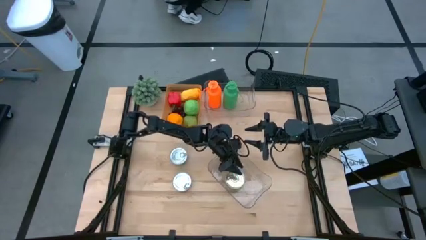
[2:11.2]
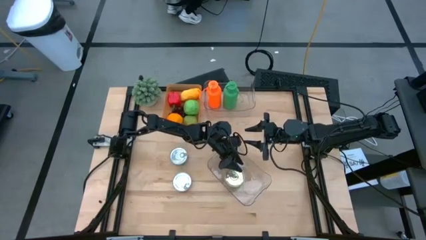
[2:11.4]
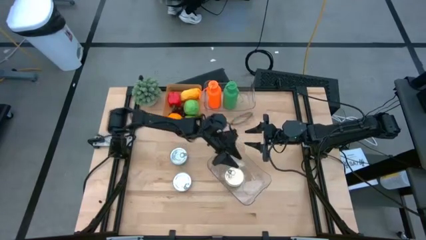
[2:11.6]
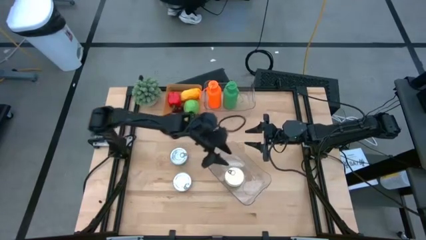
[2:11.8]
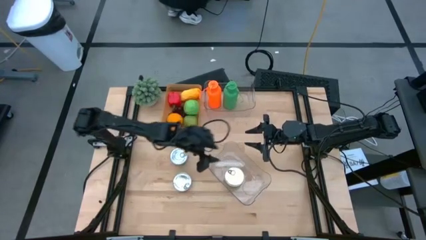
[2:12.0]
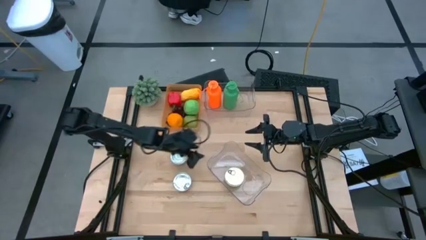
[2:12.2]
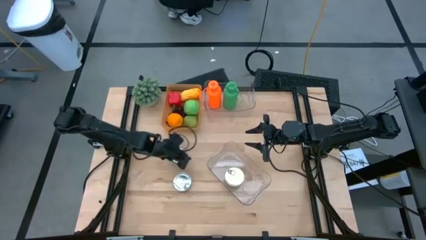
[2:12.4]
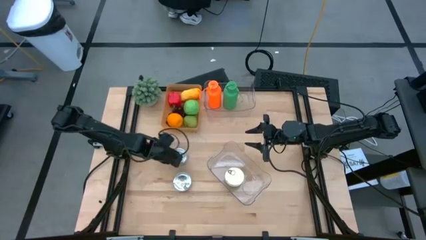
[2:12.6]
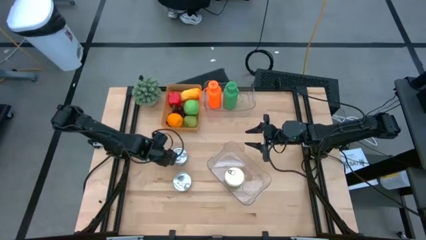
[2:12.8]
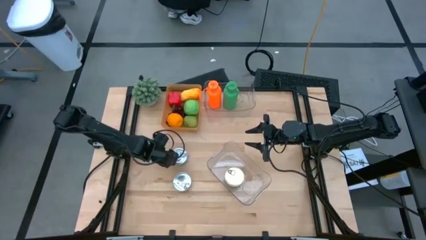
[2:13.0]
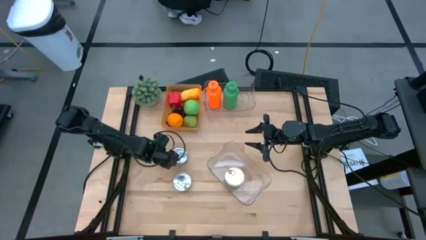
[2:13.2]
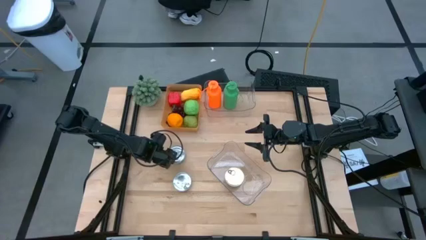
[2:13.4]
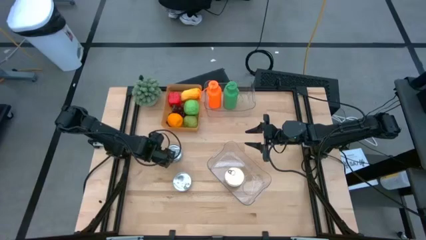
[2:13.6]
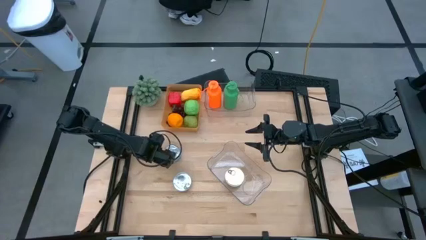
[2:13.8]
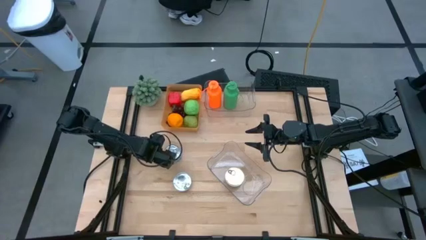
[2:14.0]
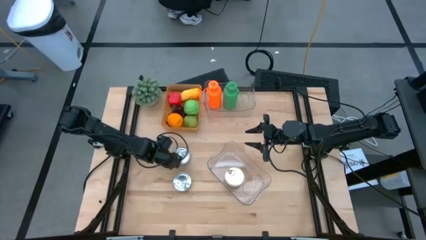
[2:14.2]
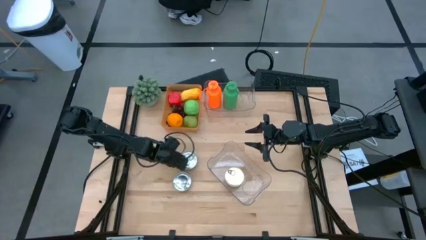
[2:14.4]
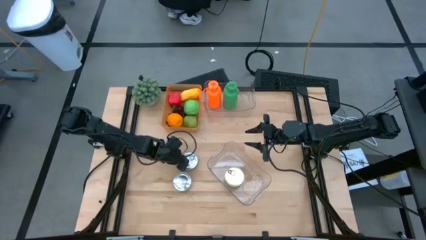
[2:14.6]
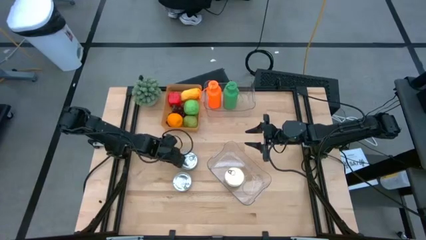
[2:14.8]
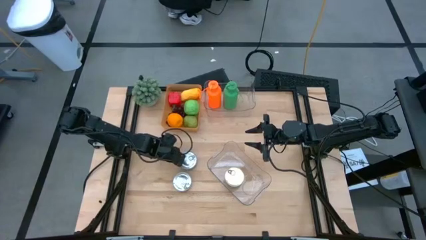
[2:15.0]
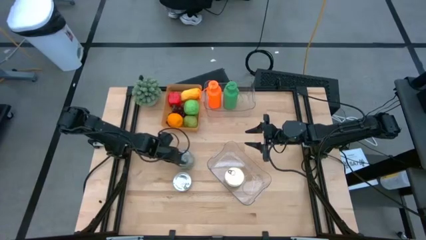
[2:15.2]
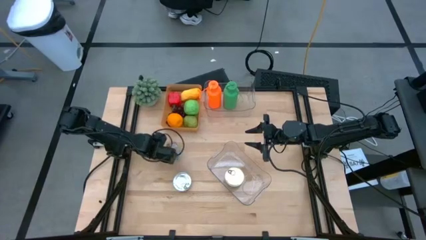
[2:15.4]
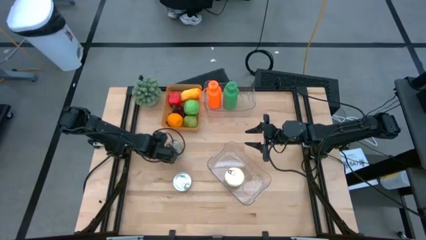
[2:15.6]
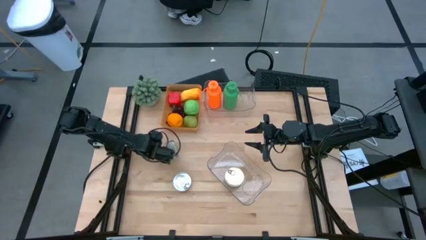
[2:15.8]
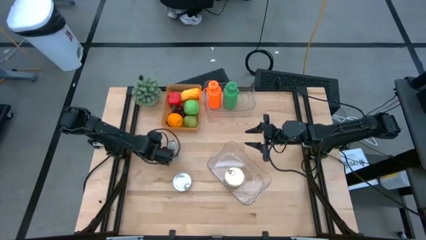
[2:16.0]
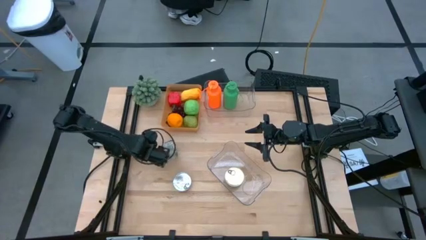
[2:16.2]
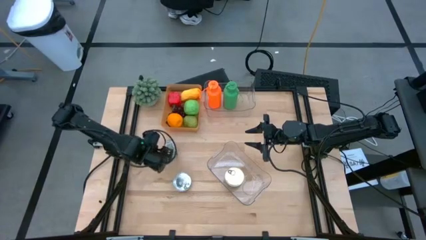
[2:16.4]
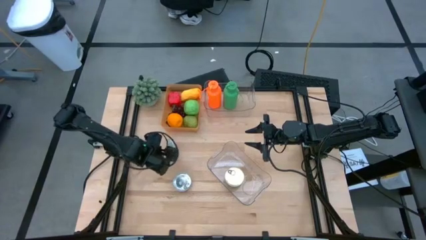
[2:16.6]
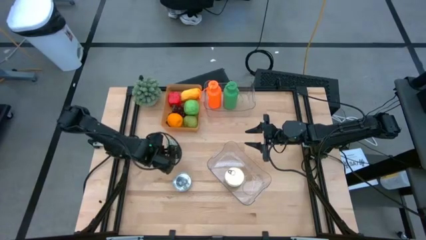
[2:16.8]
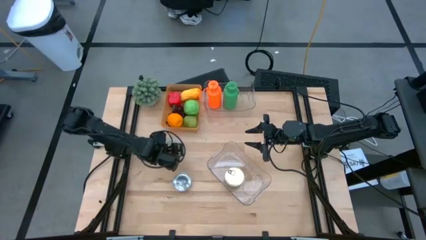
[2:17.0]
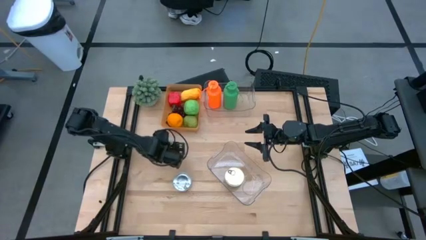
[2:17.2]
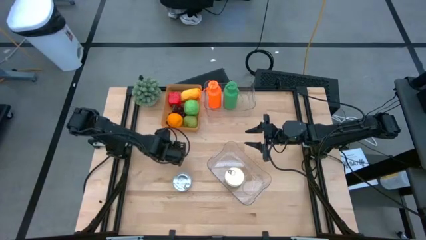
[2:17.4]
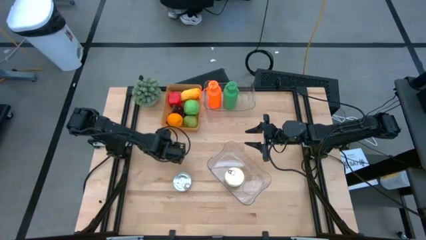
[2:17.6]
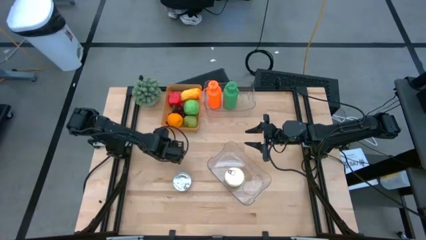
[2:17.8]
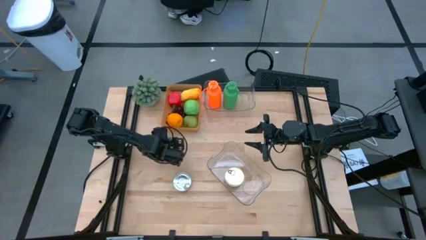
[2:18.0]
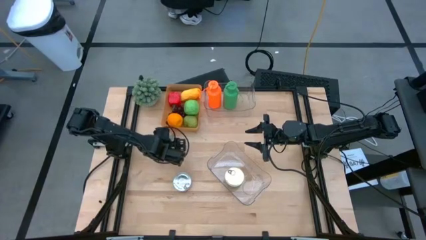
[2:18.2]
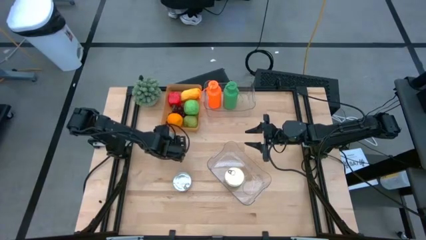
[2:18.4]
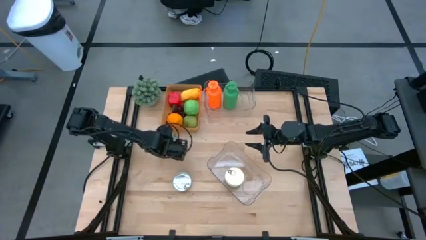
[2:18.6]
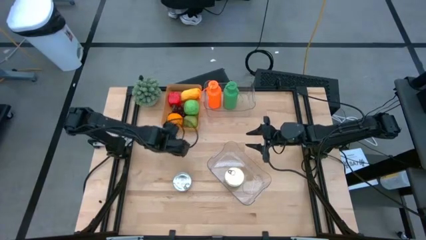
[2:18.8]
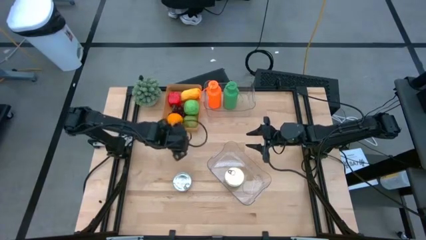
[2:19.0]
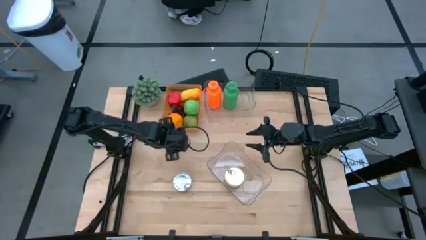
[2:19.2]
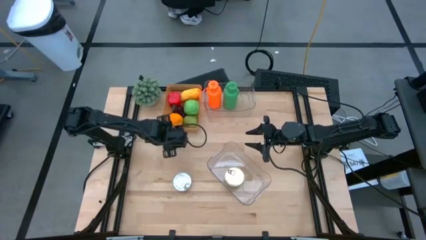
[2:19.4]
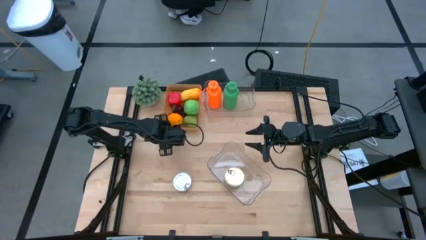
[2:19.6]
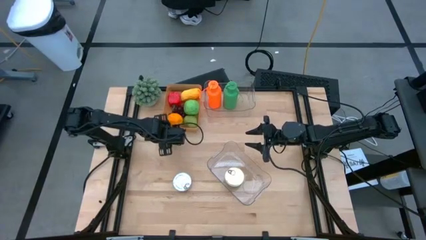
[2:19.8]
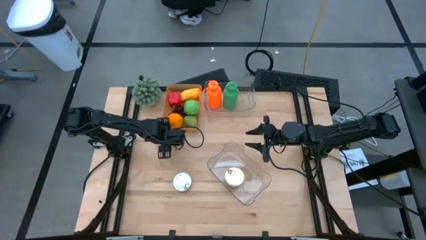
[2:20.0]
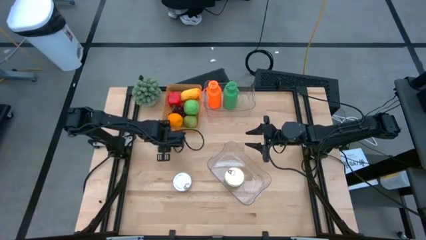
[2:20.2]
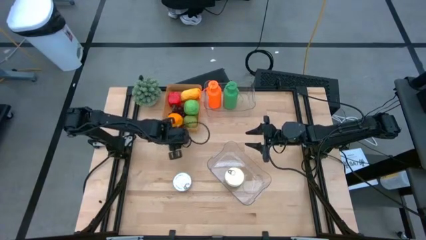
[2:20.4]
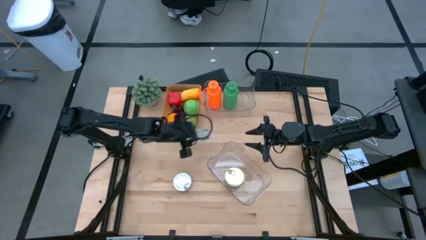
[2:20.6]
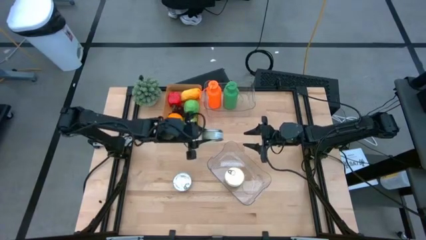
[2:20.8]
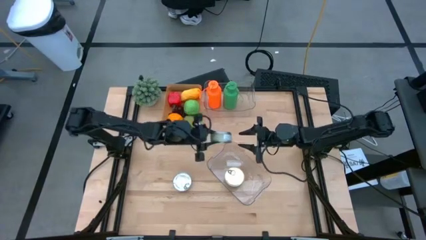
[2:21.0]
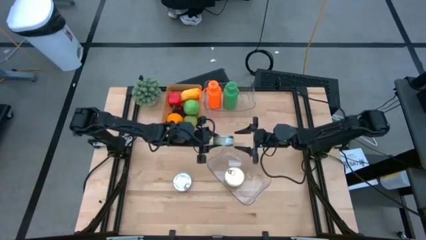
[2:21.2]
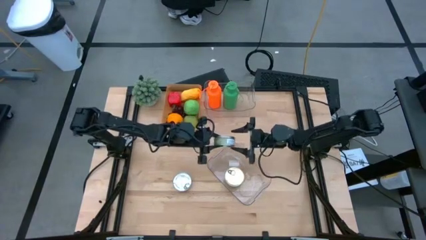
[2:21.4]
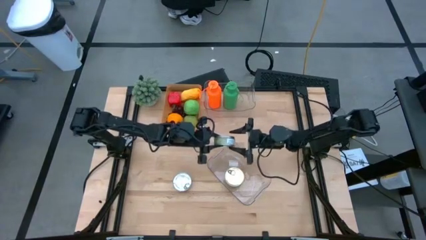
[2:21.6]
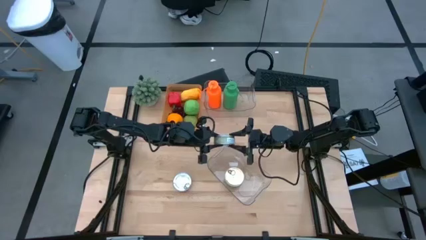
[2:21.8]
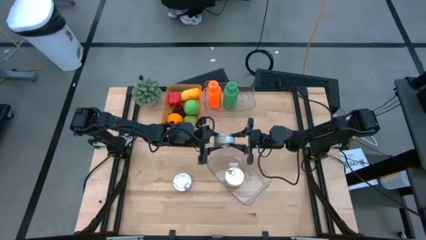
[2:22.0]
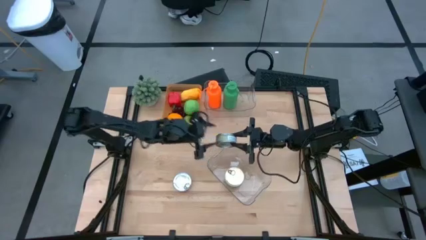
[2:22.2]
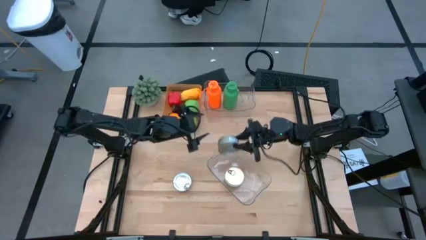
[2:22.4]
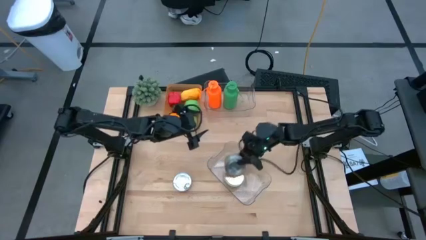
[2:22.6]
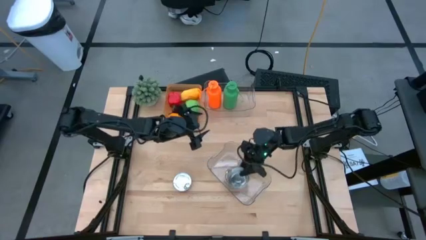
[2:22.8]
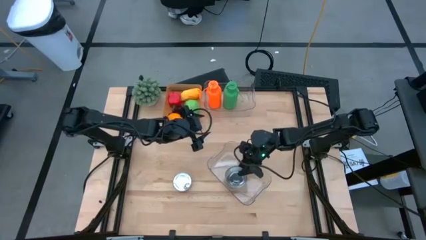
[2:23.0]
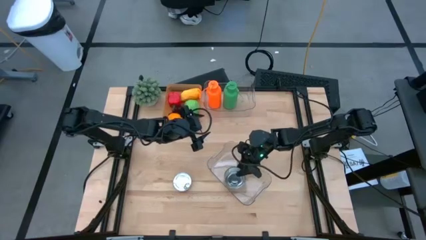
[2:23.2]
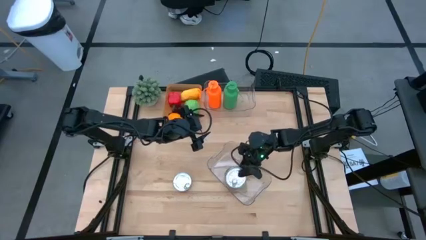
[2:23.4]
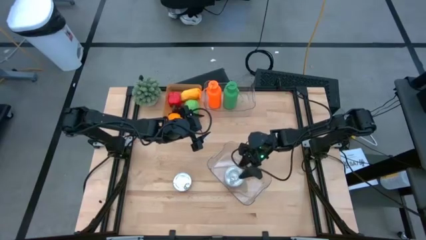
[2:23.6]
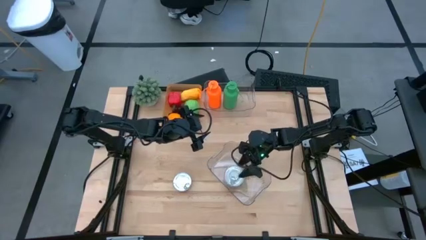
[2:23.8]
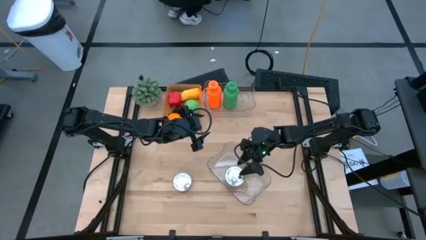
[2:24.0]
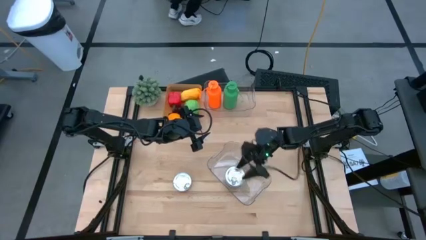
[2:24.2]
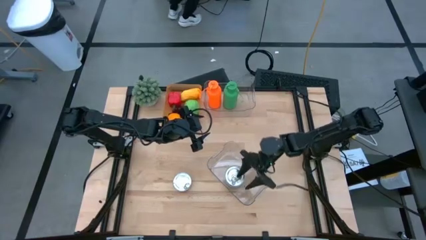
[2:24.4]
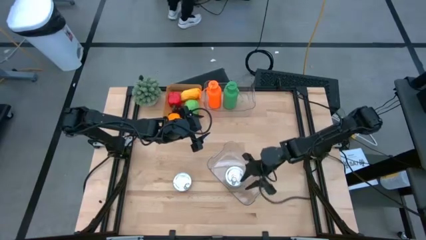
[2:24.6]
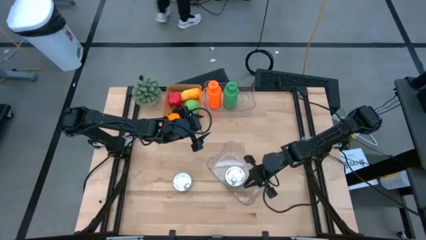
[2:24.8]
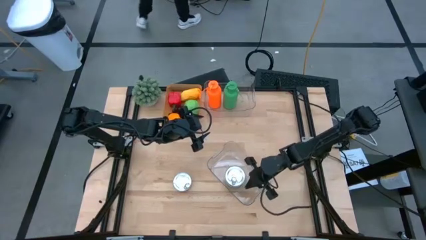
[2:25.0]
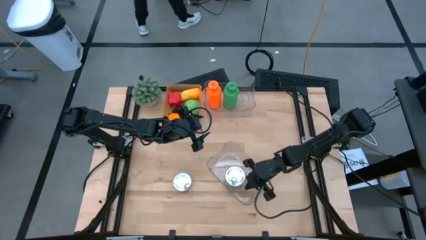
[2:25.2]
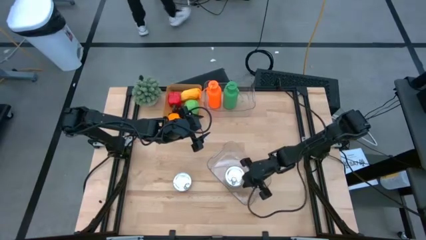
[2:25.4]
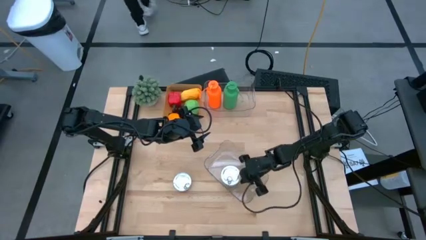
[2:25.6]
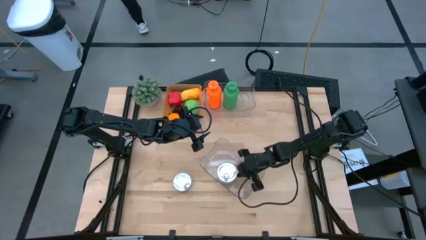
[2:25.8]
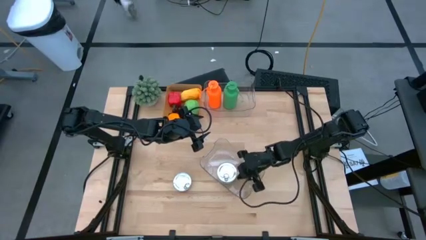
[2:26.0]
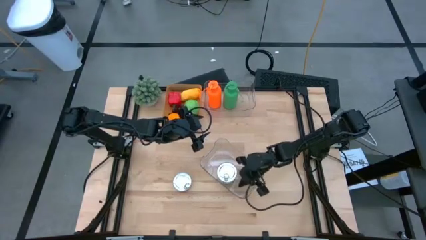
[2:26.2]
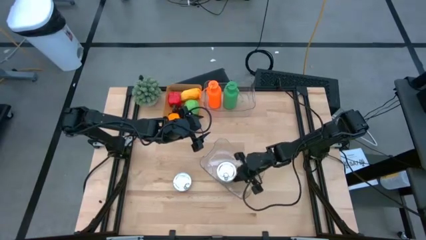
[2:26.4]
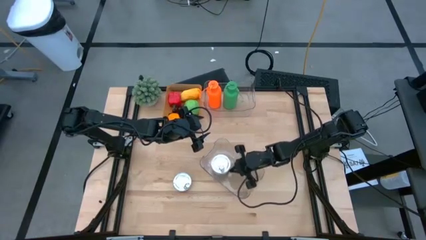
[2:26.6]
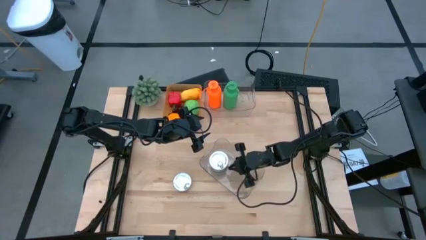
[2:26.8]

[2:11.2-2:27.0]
Task: Pick & Place Food Item
Stack the top green tuna can on top of the blue pink tuna can in the bottom transparent bin
